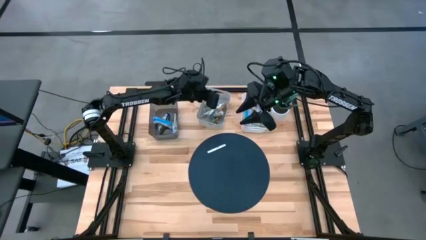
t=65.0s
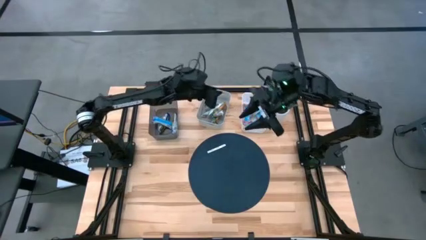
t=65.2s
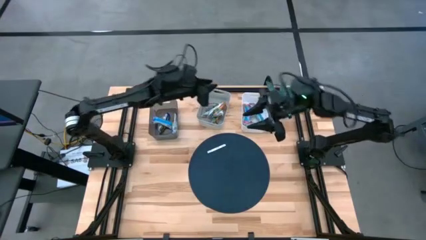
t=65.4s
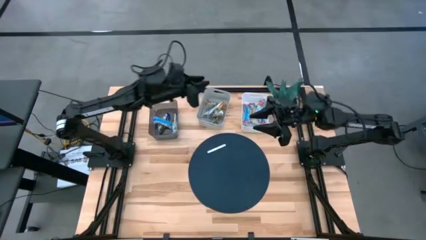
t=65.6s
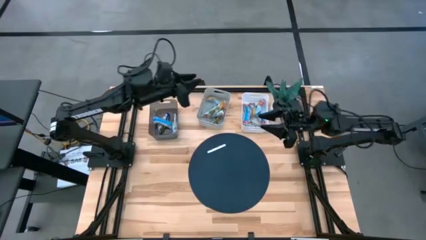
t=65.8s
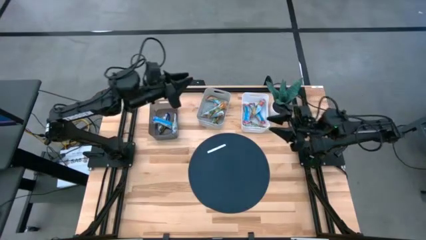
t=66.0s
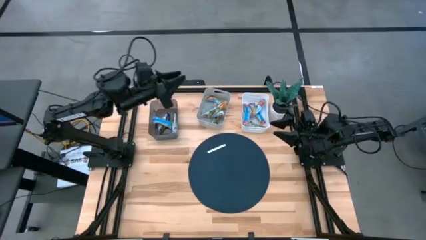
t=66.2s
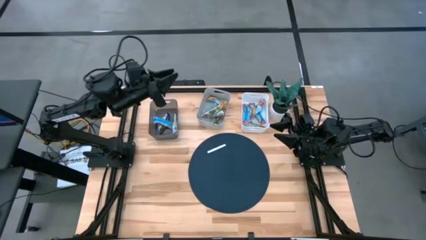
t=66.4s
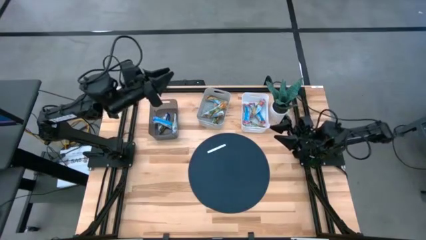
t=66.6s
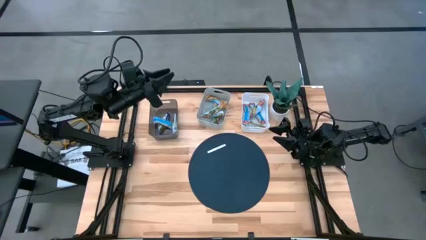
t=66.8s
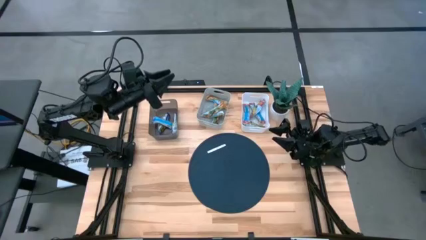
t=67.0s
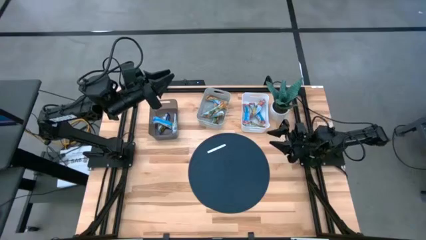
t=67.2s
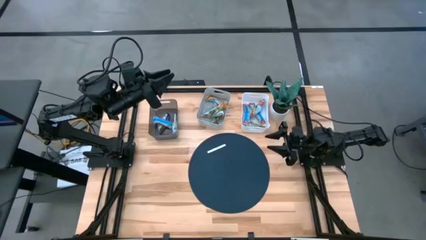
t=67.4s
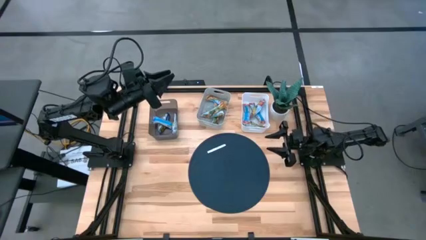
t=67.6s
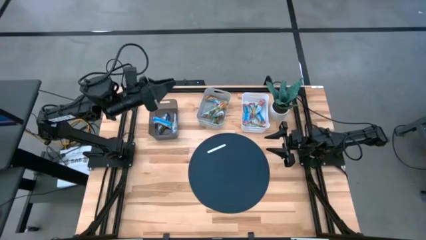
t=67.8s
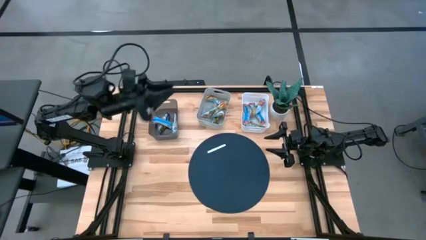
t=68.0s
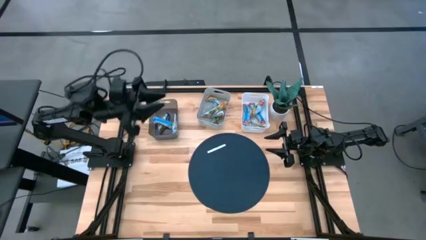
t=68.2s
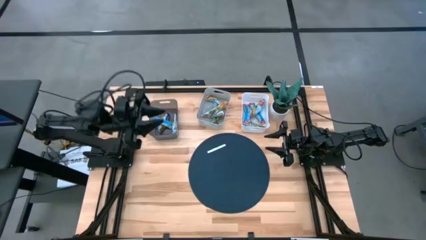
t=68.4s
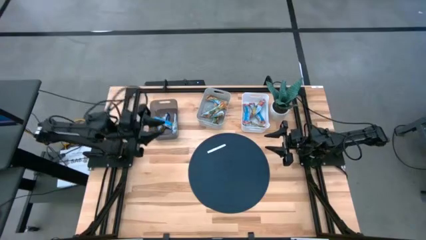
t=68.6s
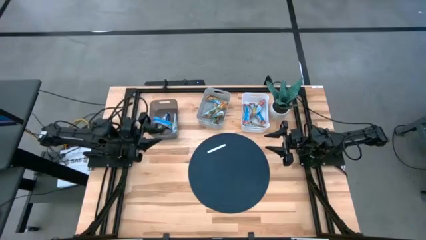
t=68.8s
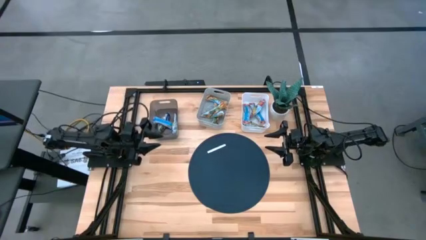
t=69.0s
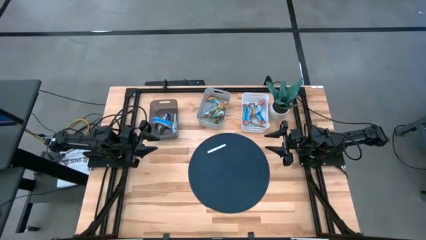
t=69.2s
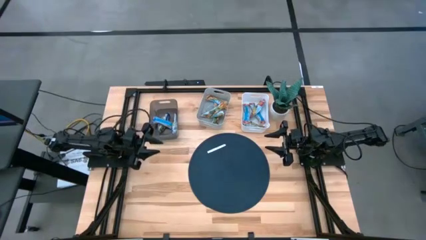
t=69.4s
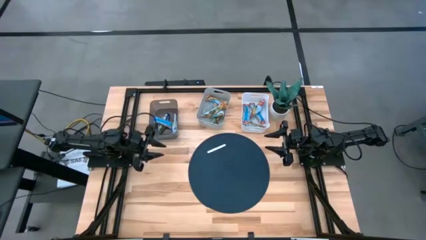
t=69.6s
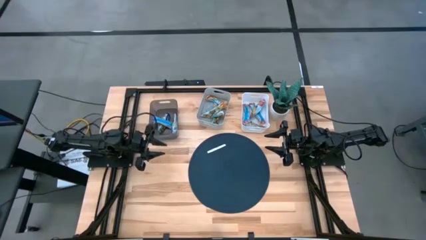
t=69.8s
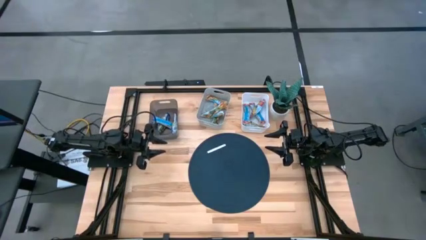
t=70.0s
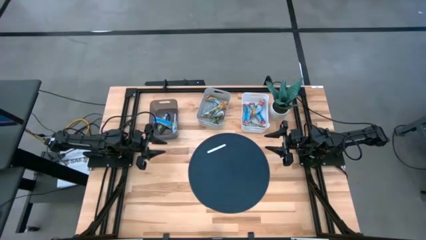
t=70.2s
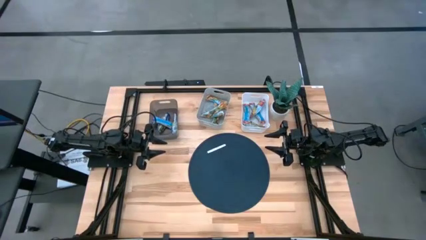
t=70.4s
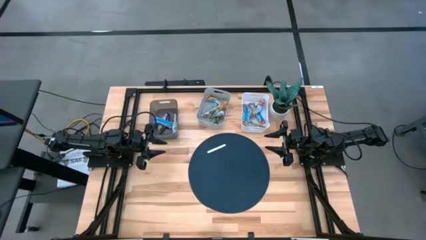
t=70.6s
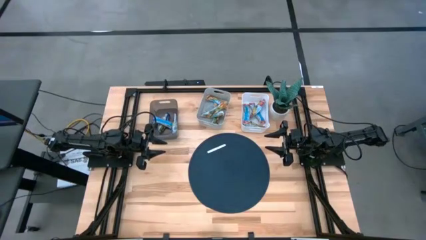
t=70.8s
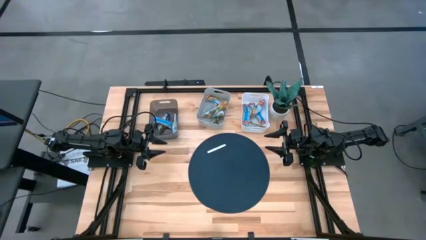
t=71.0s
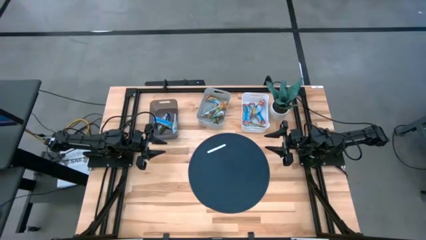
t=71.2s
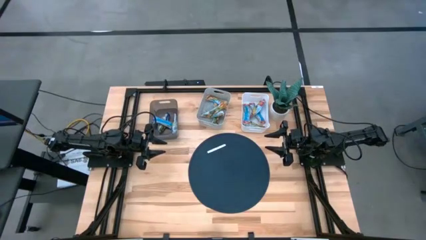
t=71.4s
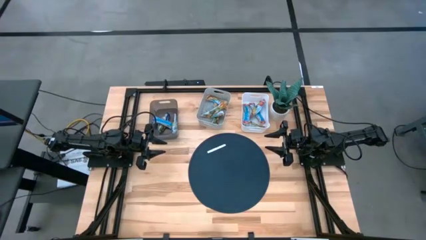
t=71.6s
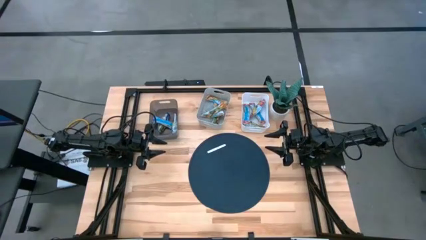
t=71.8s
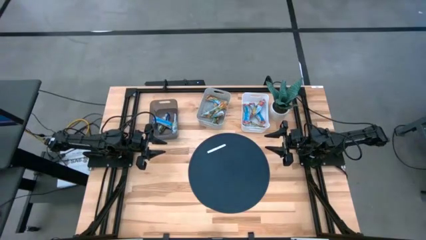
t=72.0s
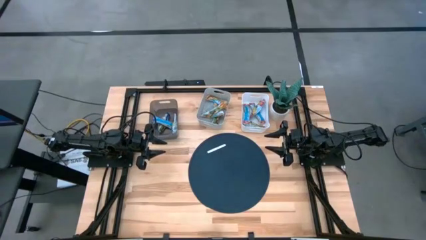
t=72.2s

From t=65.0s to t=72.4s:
Task: Pick and place Granola Bars by type
Return to Home Position

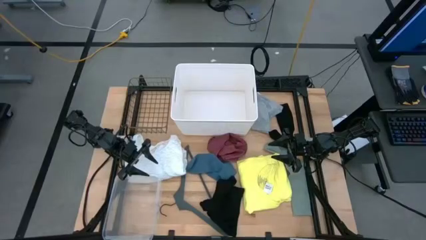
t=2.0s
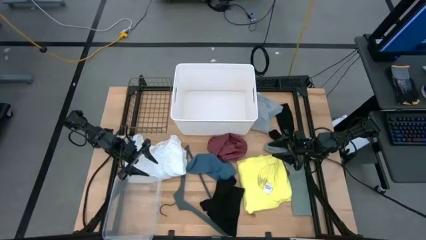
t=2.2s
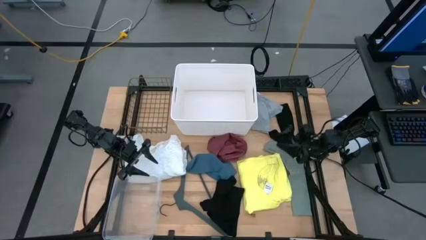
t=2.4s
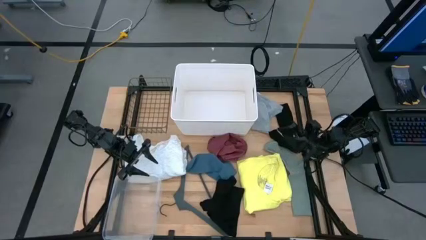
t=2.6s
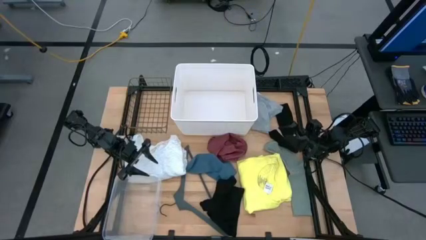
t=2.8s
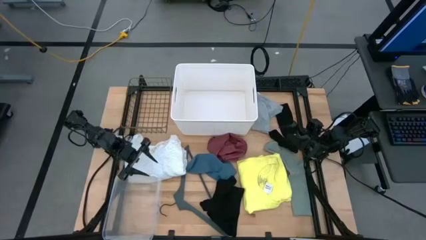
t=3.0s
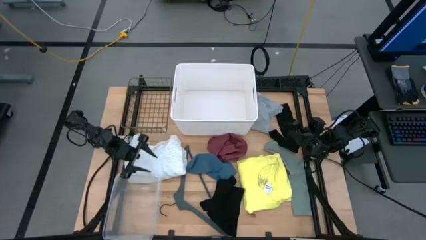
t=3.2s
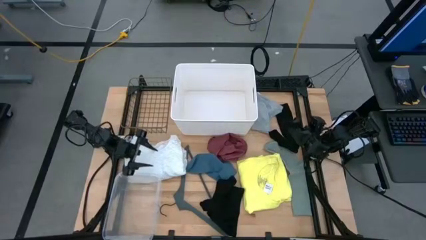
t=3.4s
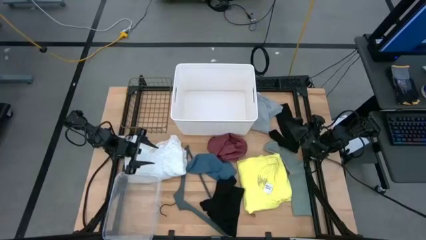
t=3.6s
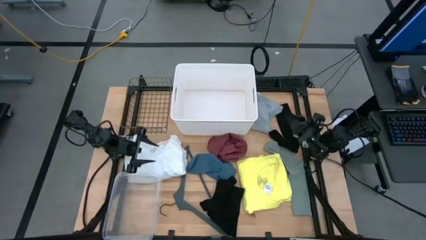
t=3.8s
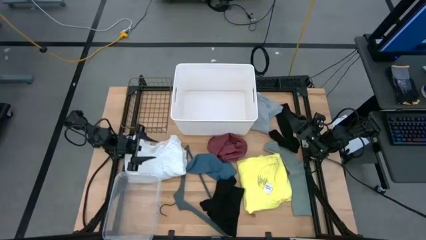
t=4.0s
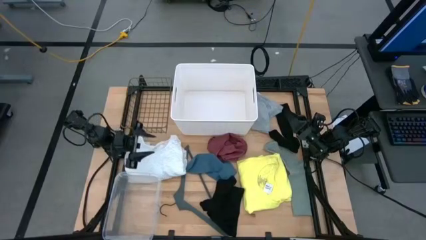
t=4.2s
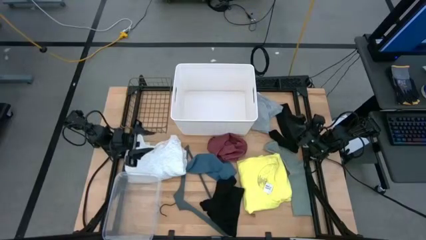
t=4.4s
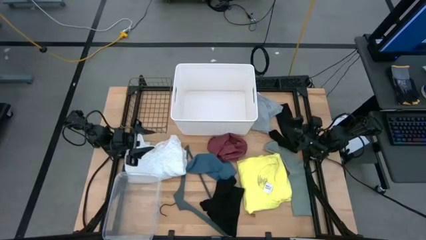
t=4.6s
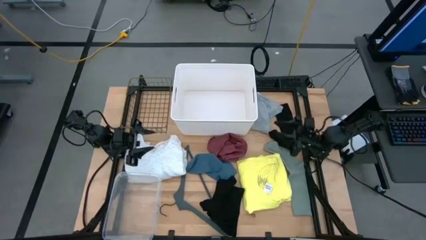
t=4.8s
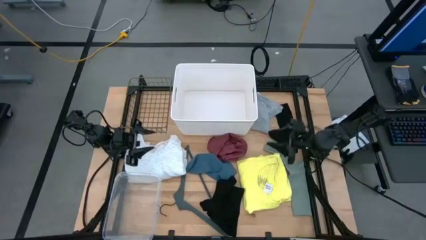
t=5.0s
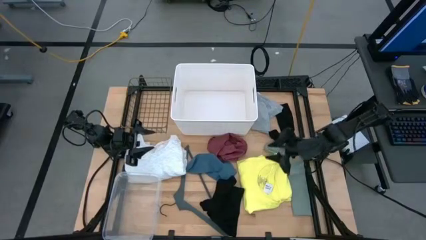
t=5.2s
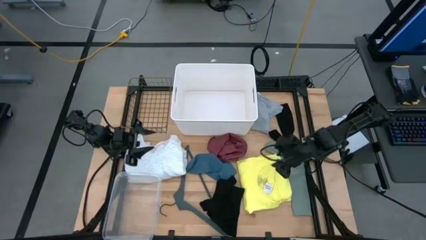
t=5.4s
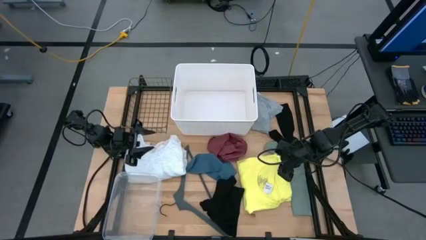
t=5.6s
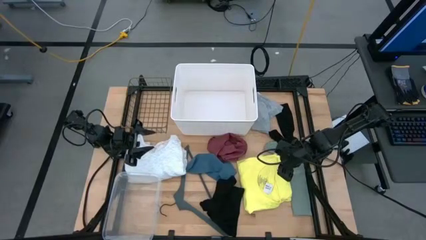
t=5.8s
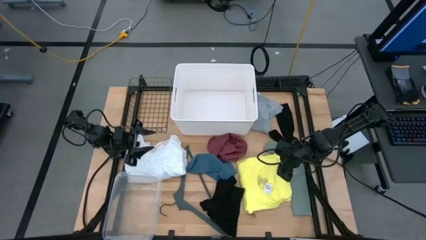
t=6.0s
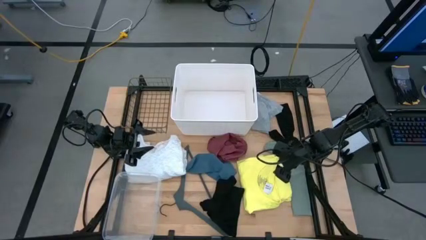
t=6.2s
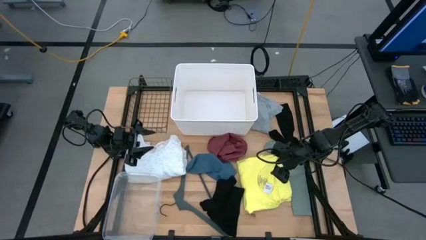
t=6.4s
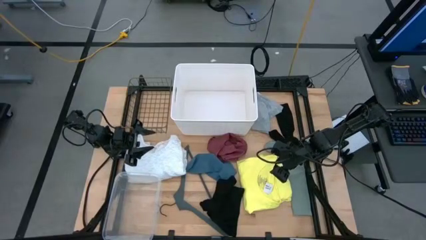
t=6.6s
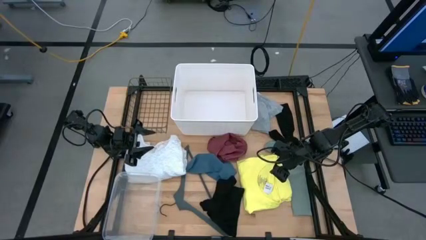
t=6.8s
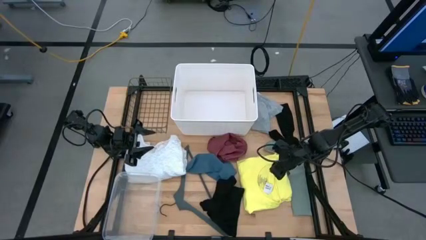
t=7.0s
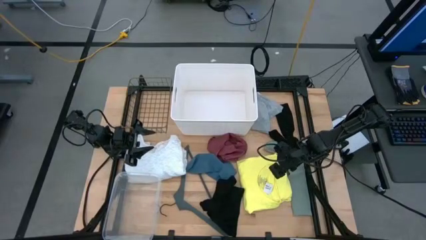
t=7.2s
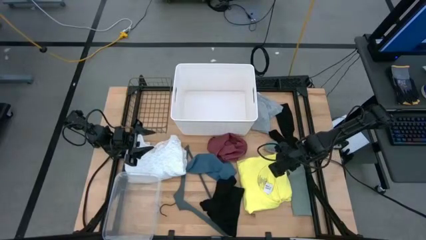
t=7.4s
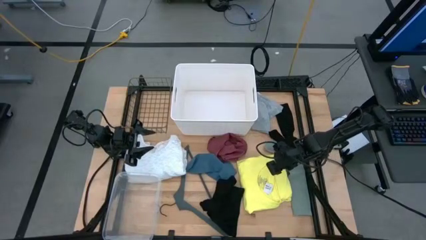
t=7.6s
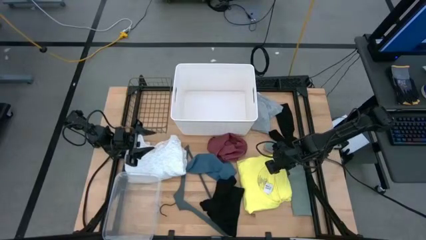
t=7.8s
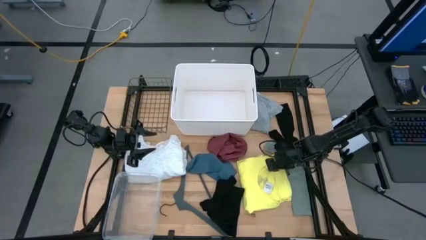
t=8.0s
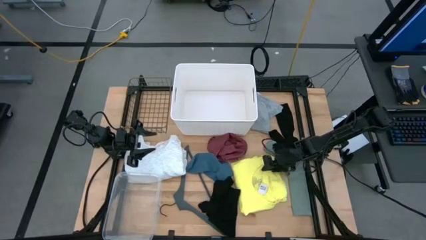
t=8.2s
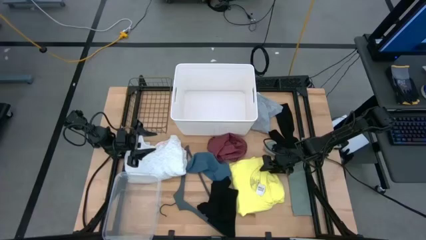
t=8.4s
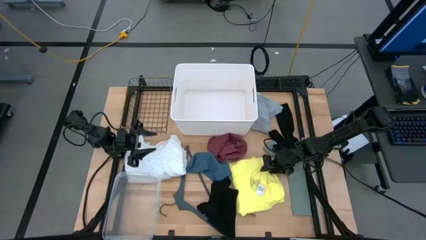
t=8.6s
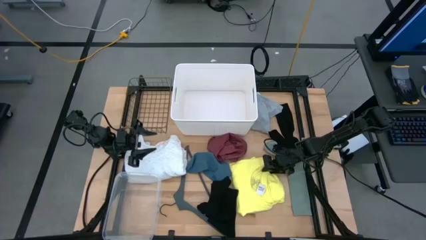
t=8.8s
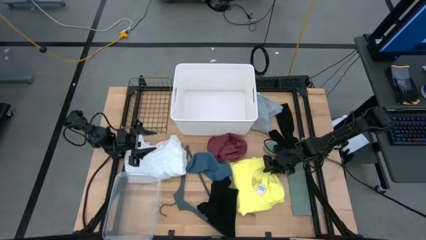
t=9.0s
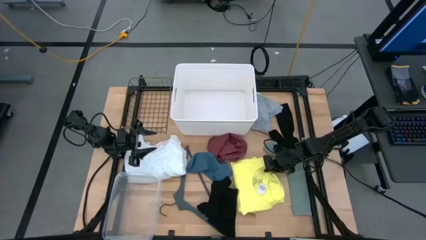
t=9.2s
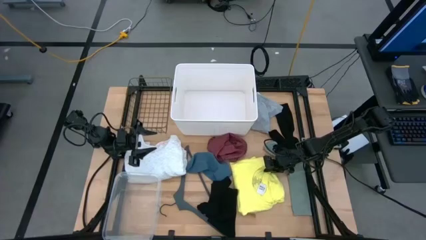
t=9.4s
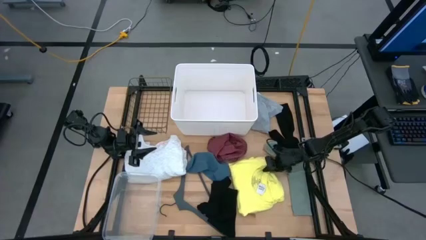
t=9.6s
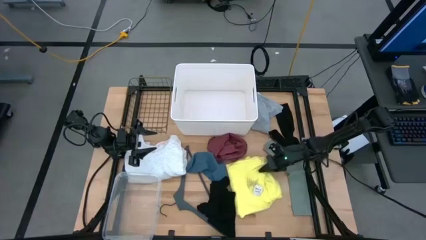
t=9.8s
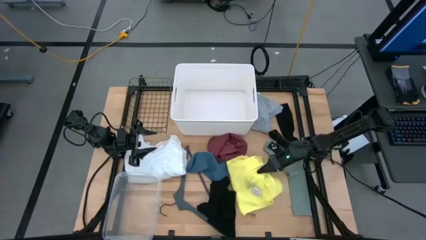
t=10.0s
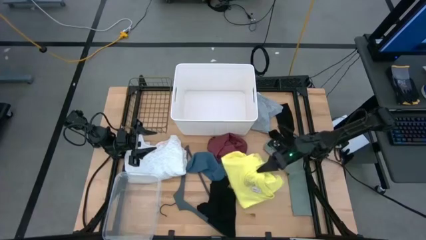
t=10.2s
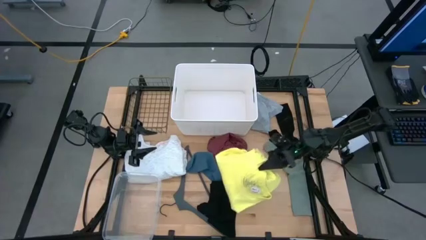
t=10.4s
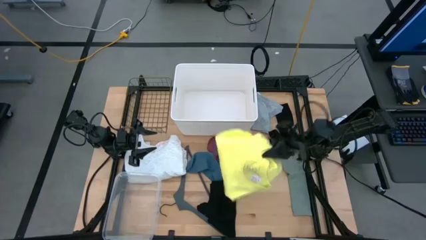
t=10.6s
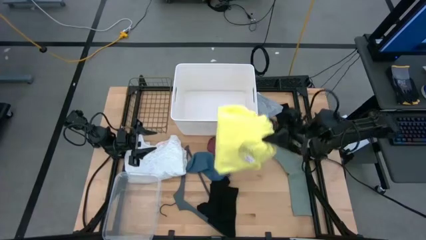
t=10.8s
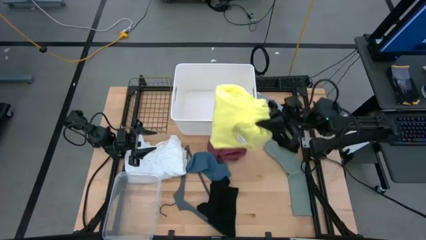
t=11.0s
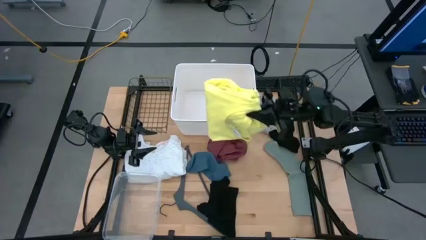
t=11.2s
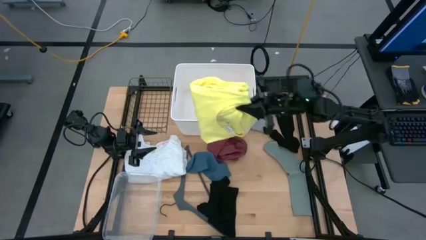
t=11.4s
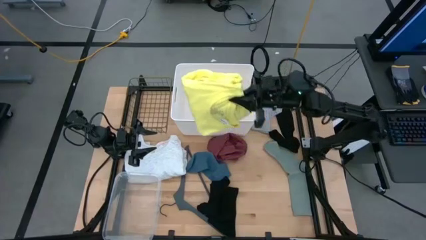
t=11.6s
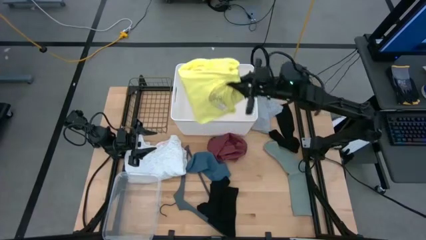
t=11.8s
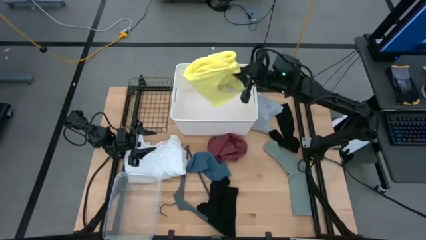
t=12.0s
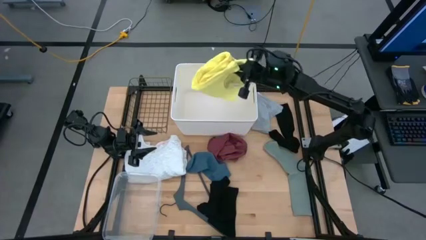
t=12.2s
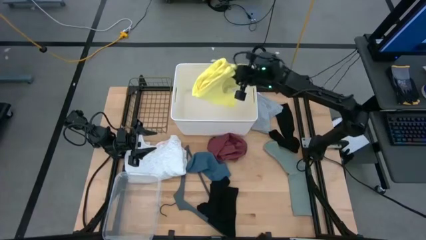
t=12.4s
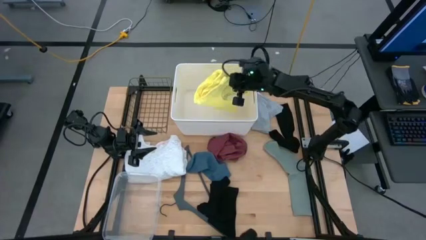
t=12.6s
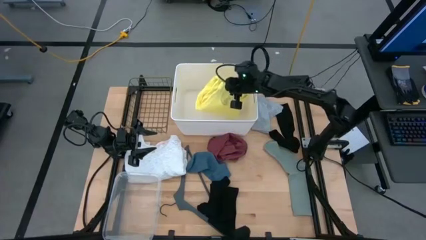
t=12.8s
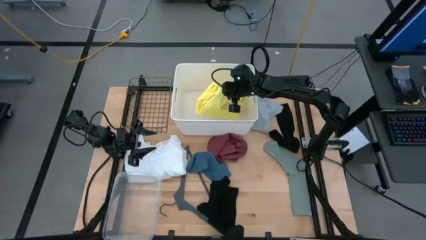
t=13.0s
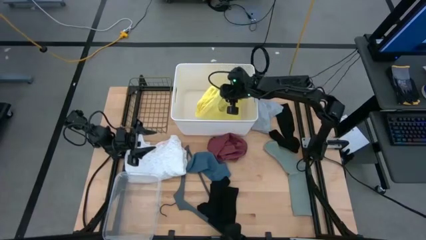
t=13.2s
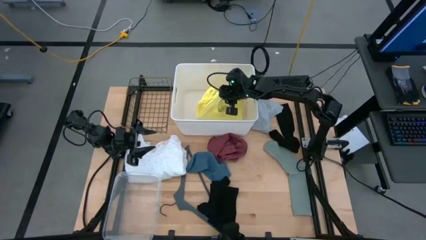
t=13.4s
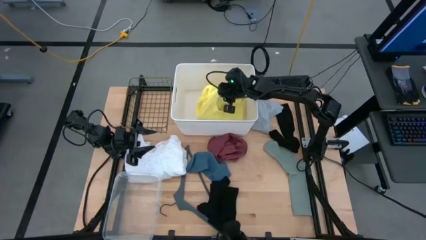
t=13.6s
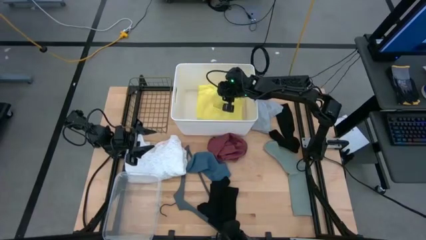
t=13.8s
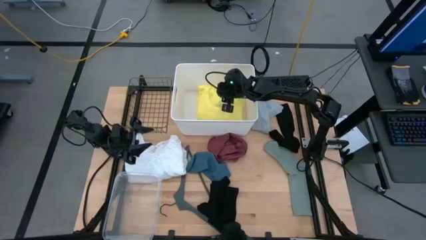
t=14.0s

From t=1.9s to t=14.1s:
Task: Pick & Place Cloths
Put the yellow shirt into the white bin
